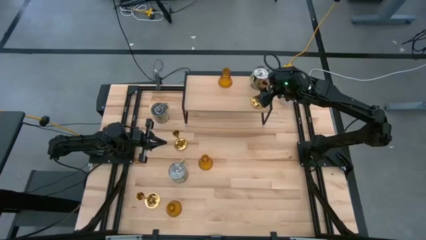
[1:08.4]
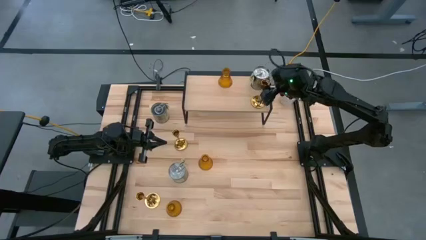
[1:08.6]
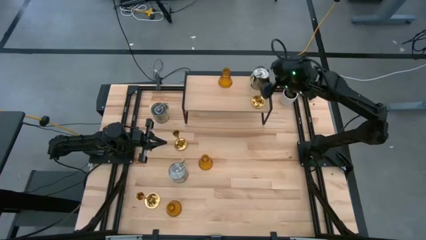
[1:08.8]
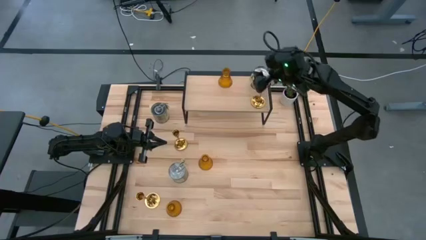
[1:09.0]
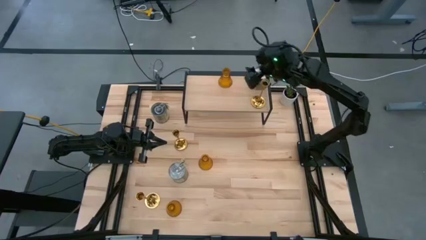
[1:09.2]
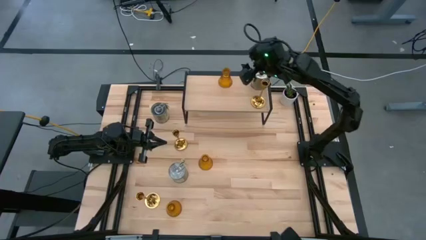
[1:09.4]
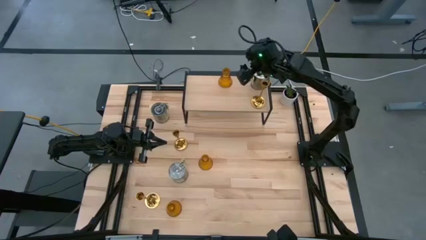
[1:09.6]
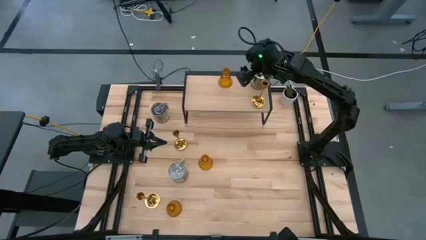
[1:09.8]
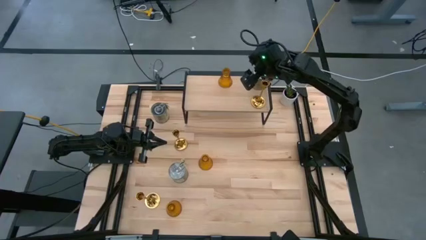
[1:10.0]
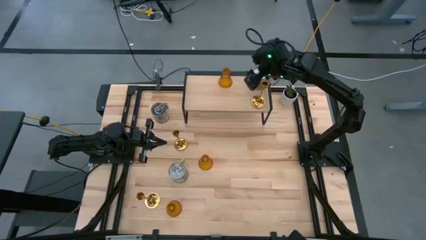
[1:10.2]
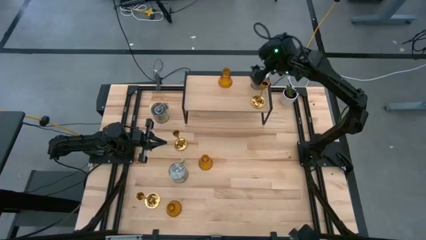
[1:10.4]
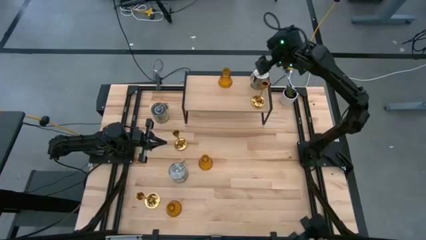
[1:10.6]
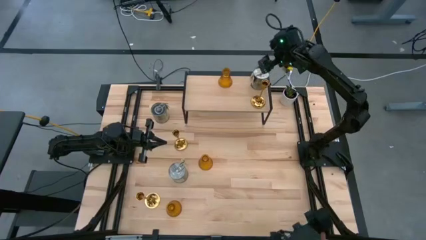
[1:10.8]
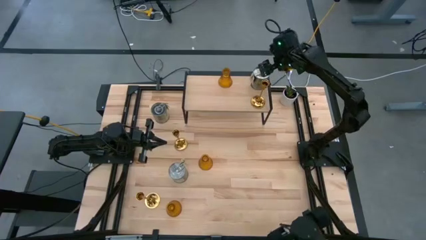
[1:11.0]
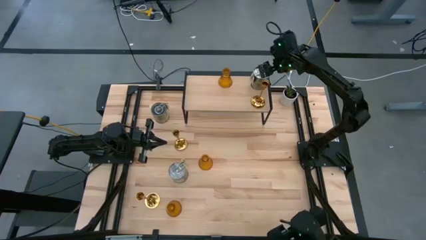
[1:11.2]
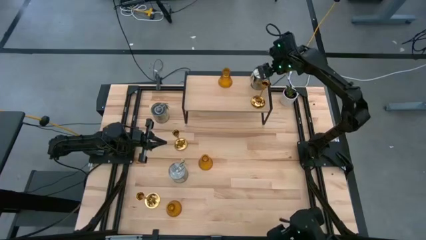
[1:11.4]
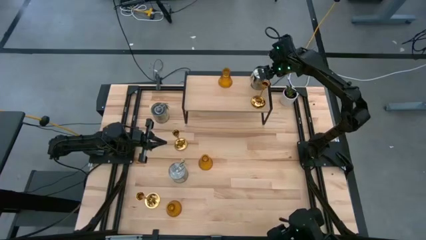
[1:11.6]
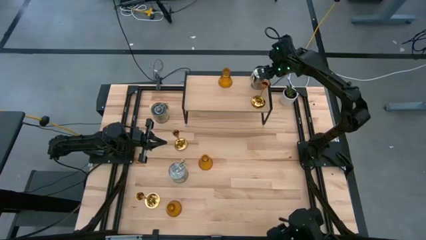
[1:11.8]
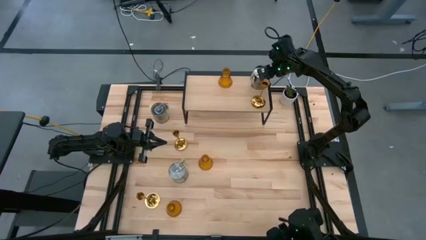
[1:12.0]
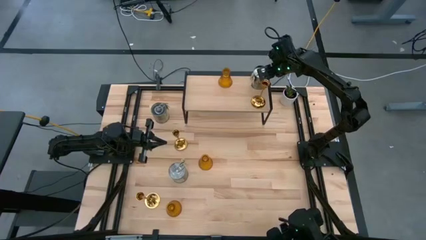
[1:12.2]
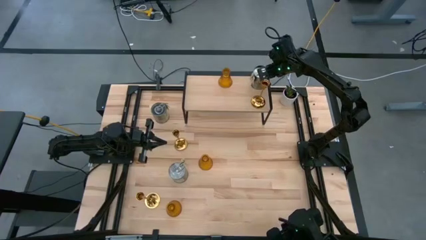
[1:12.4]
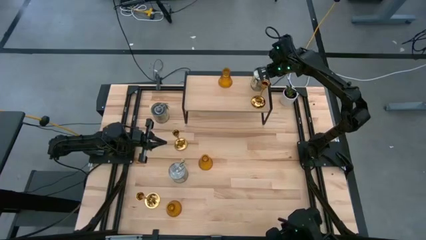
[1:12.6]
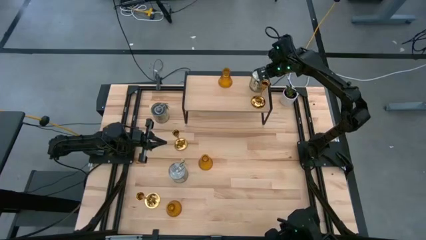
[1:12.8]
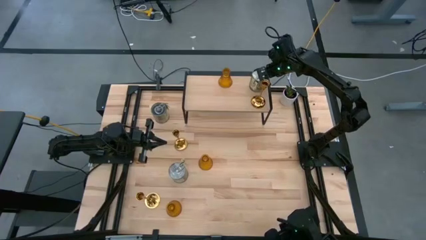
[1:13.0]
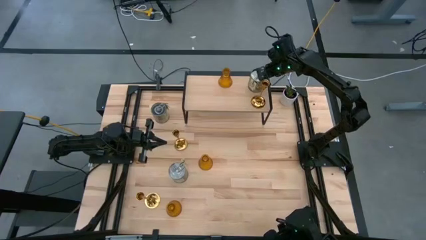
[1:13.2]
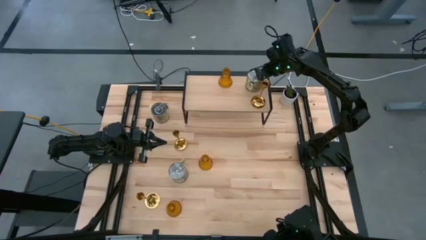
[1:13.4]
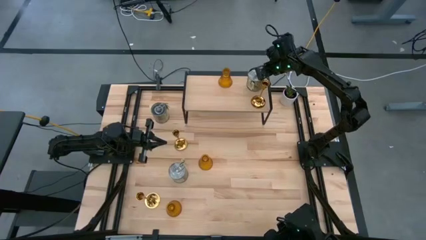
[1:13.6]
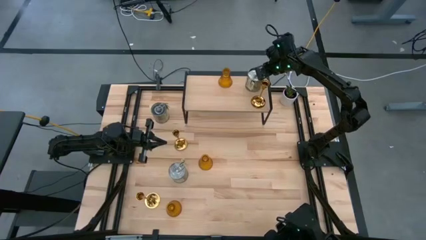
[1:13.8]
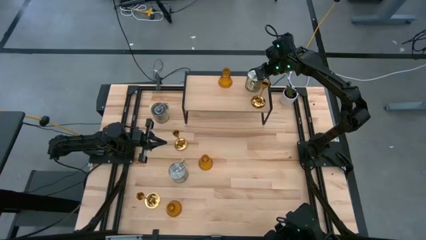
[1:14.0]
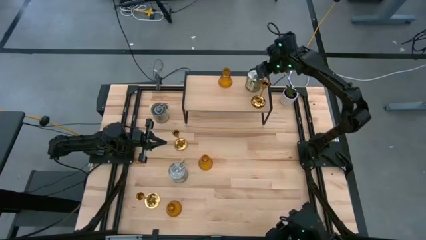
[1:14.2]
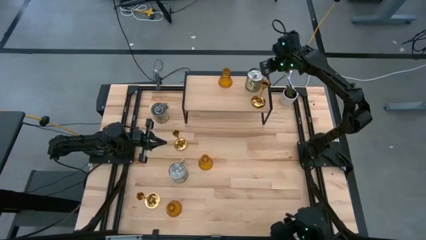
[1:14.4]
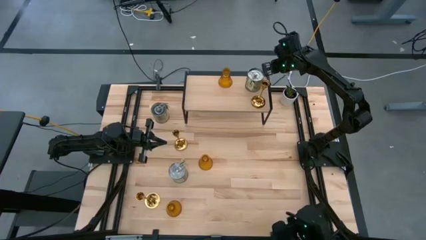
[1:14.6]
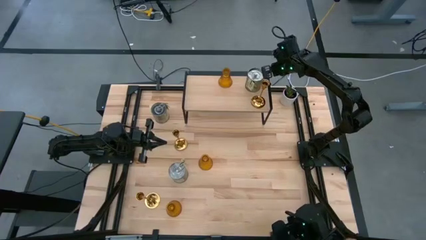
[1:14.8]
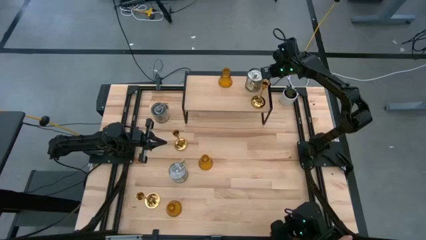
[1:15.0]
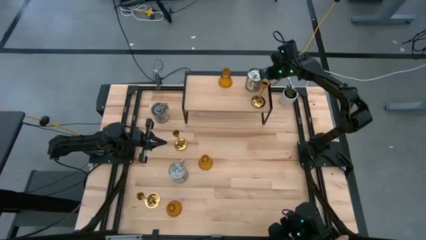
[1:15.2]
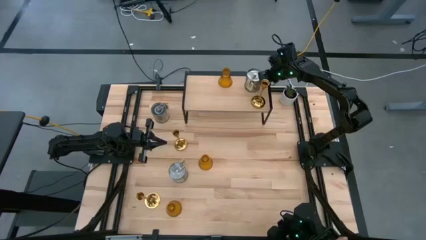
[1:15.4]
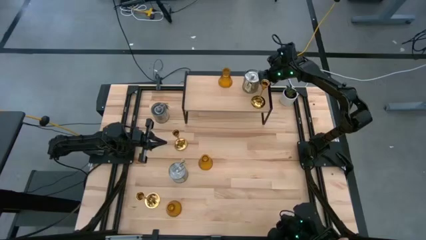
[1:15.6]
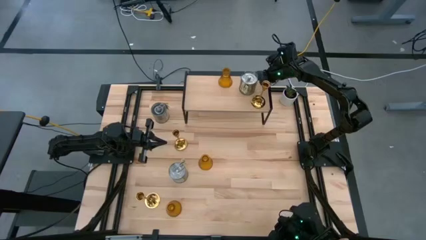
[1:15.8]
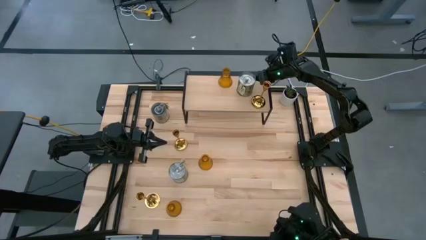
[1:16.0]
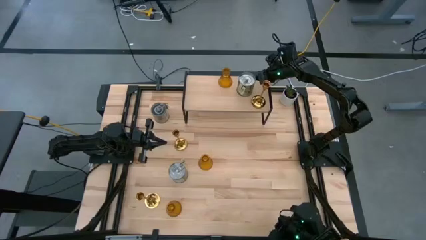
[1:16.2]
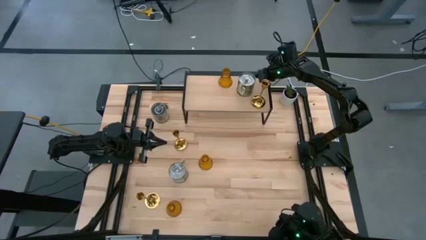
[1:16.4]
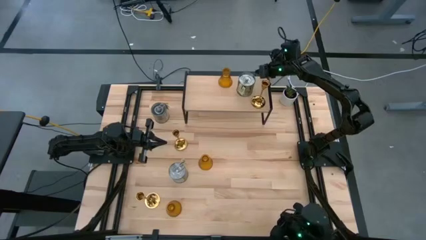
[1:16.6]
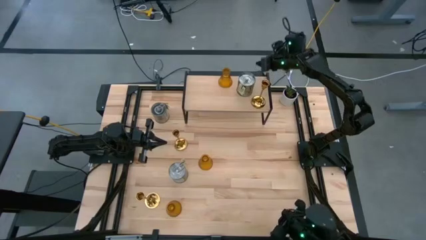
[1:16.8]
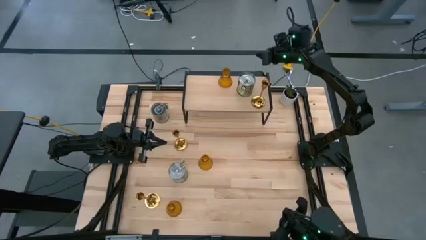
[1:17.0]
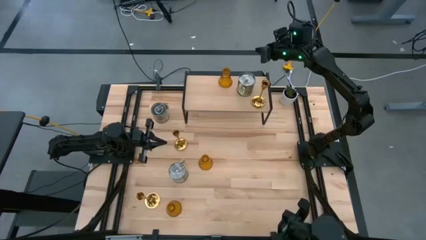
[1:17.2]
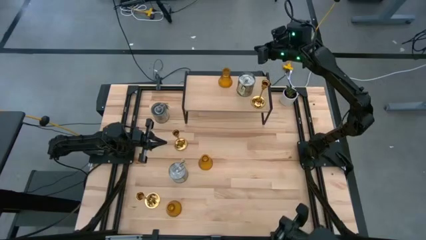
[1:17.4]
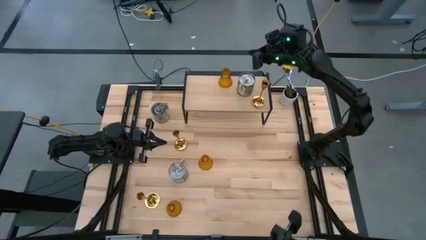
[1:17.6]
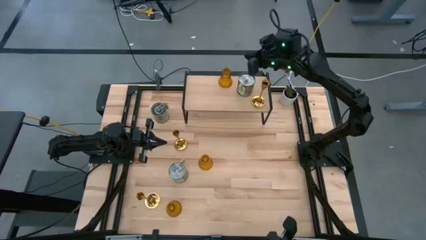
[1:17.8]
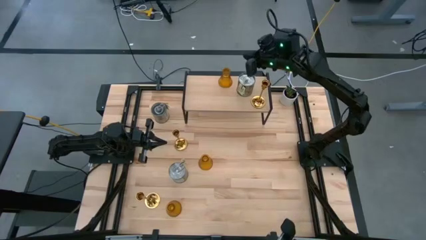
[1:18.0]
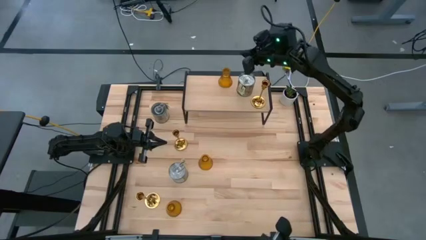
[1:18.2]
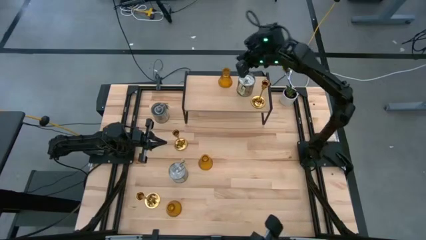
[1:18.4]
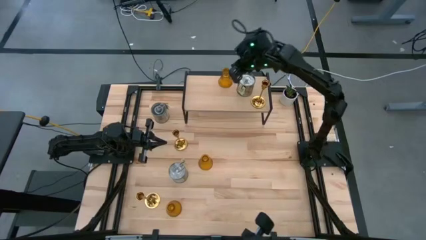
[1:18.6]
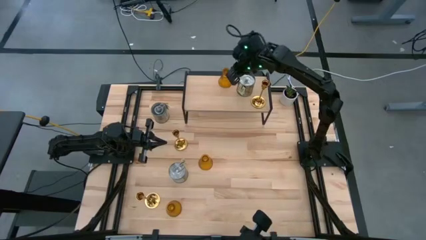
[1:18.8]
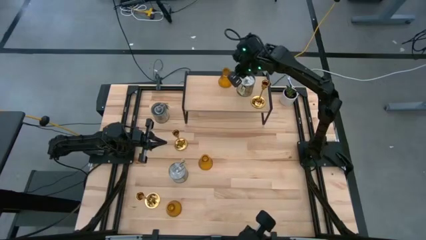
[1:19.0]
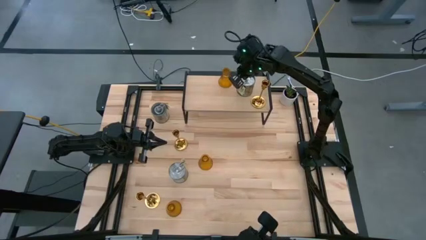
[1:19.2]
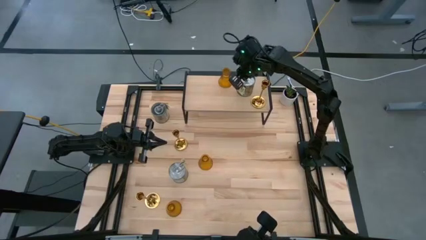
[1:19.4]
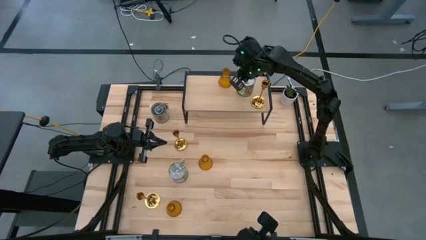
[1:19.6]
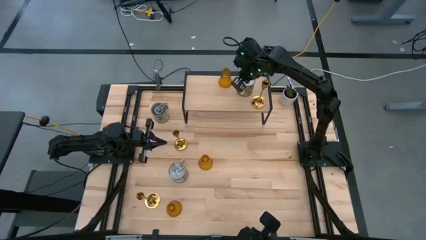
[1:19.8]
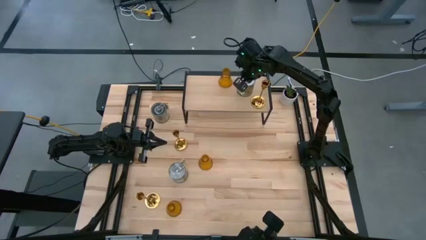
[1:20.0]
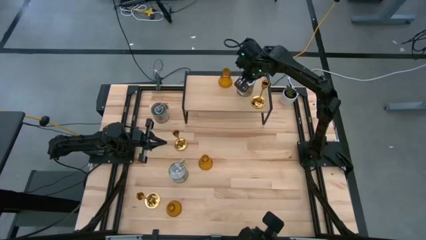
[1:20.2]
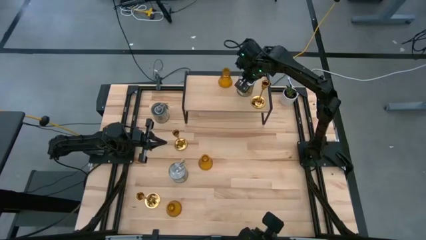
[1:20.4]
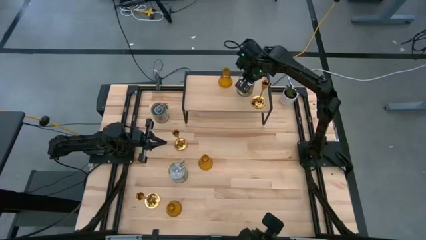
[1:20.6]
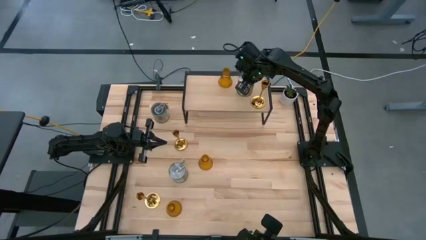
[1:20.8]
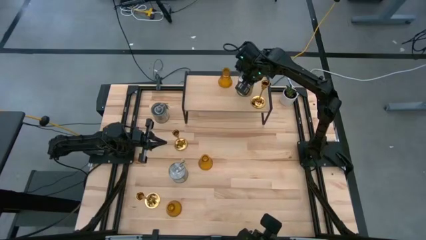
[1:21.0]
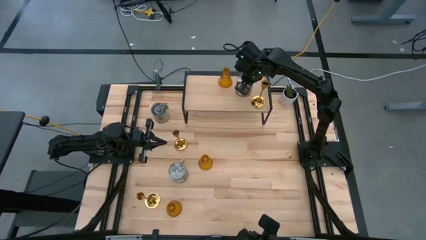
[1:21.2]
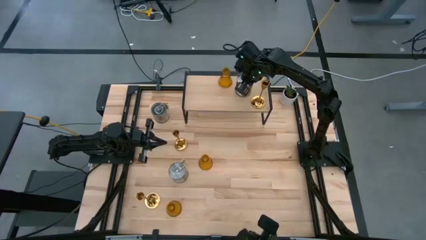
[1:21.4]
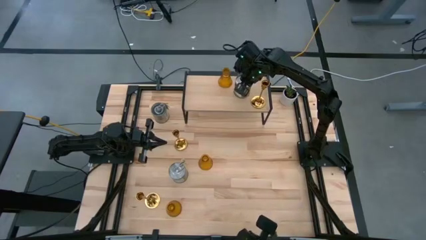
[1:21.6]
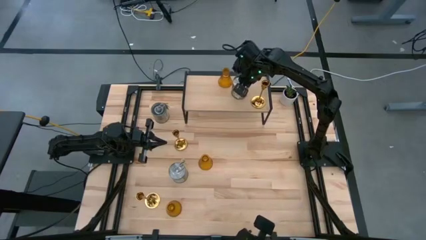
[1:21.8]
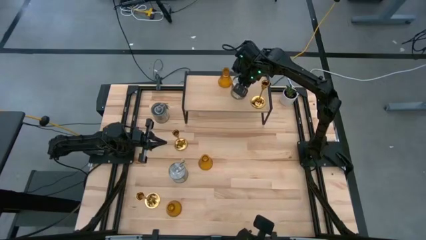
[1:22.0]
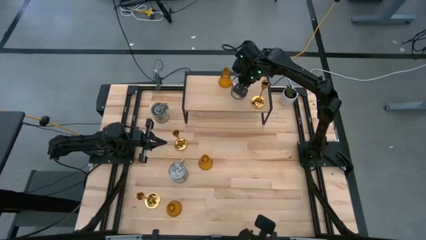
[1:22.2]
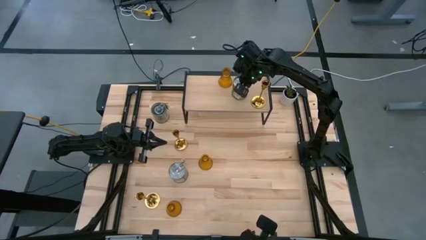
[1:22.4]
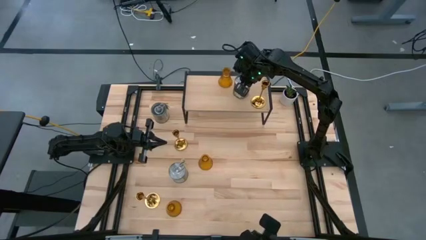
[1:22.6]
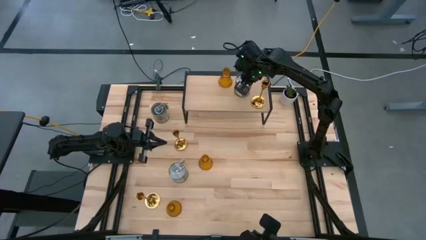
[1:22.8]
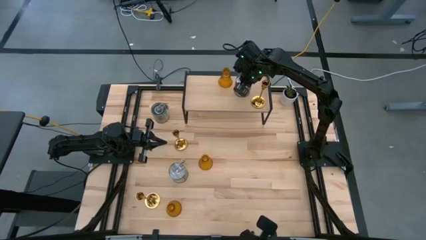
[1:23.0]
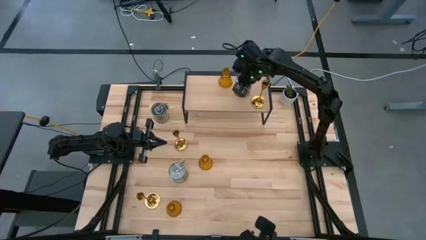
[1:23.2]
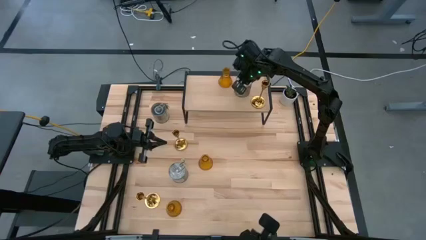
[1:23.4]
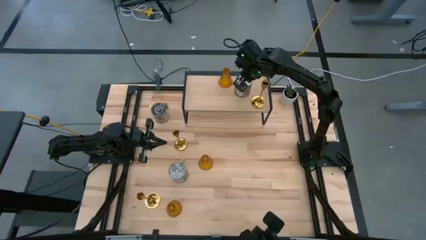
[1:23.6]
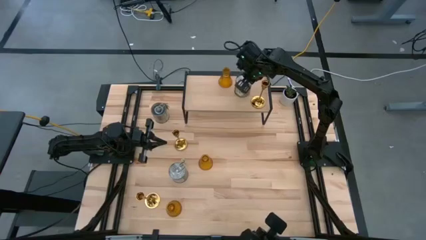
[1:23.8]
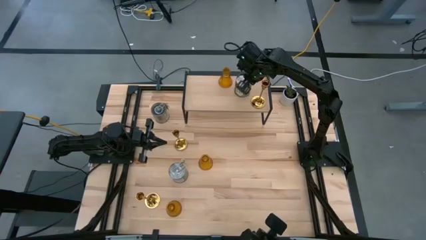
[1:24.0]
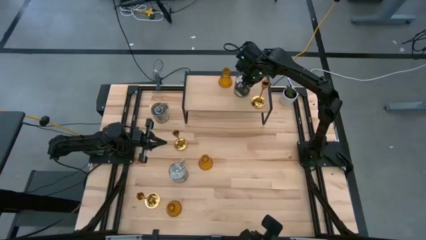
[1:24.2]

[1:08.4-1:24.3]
Task: Pick & Place candle stick holders
Adjust the scented candle on the shelf

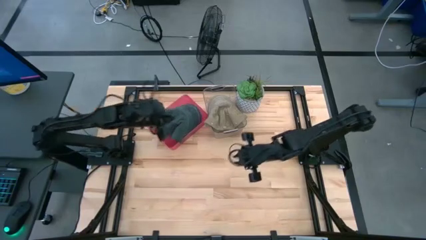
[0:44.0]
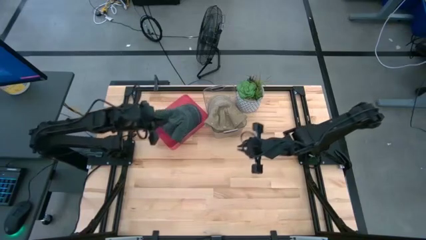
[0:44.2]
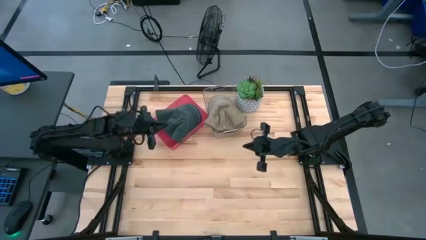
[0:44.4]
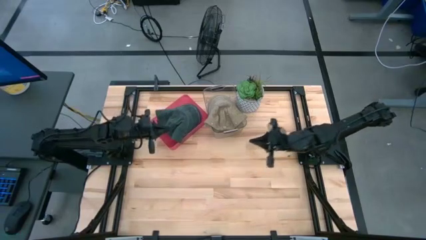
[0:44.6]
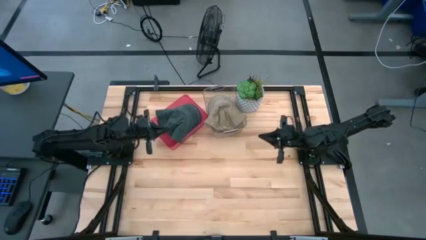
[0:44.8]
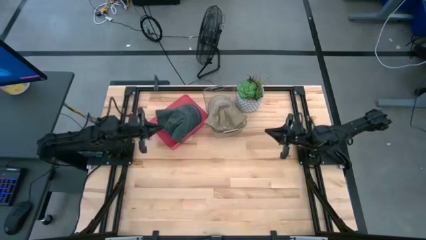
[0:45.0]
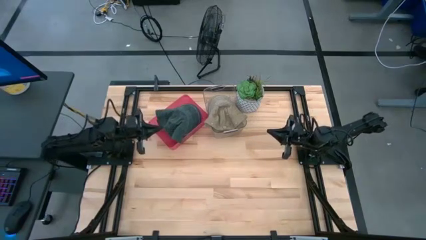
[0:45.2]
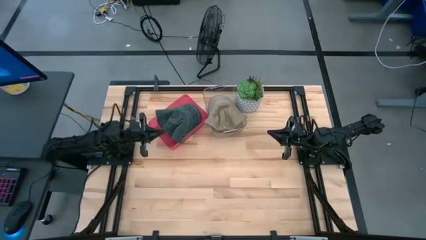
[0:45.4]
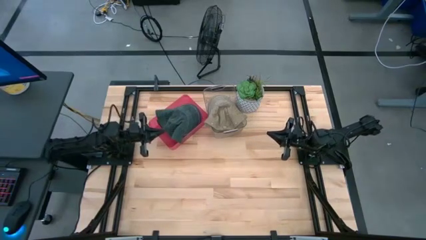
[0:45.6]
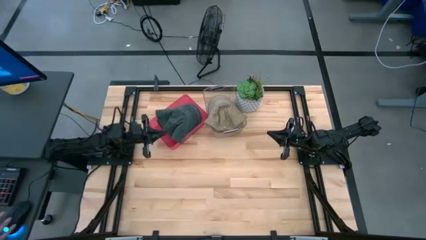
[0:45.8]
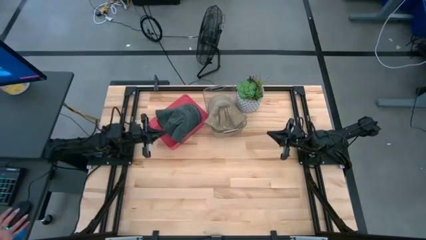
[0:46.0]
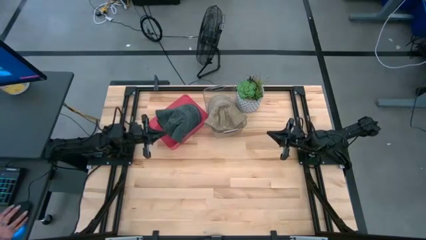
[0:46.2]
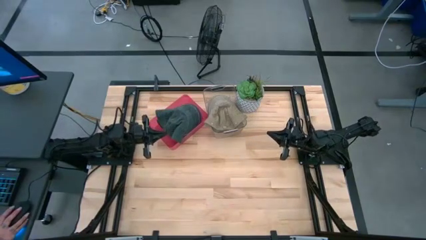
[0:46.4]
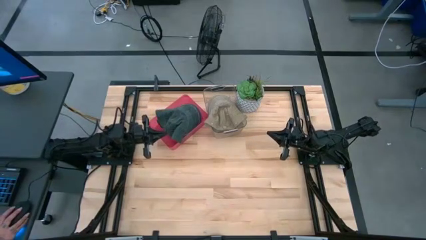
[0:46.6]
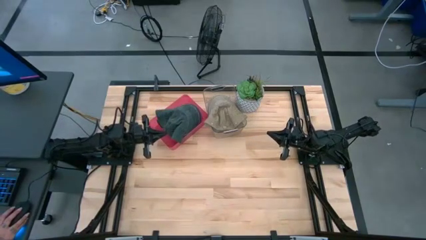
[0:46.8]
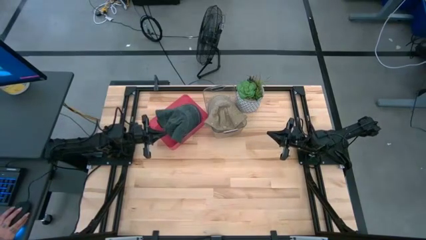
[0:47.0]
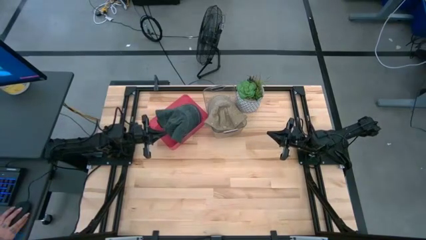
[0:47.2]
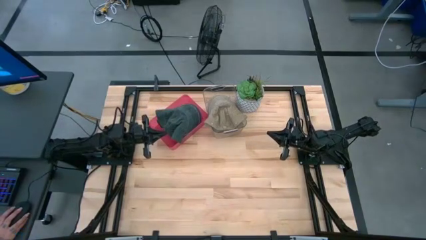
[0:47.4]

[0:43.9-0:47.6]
Task: Pick & Place hat
Return to Home Position
